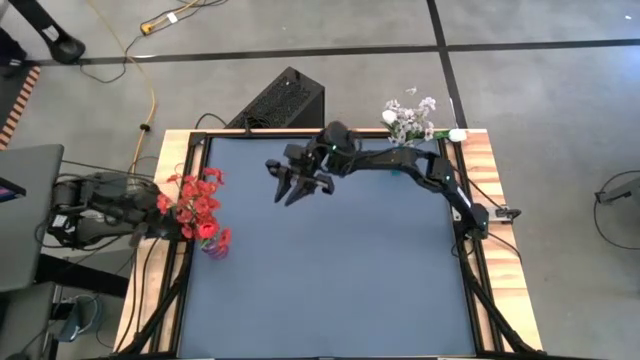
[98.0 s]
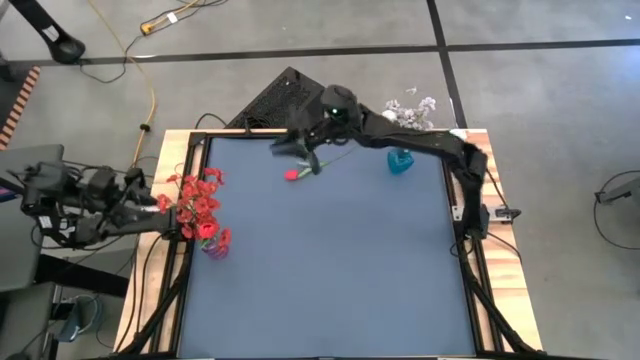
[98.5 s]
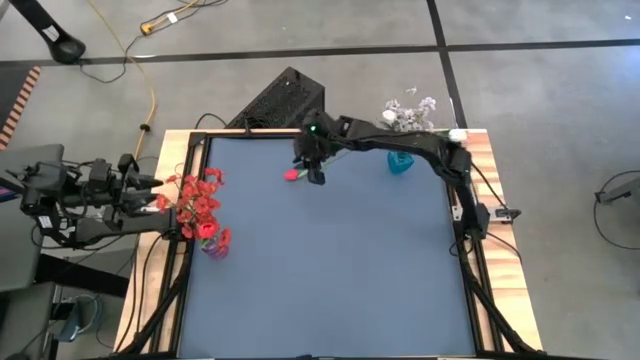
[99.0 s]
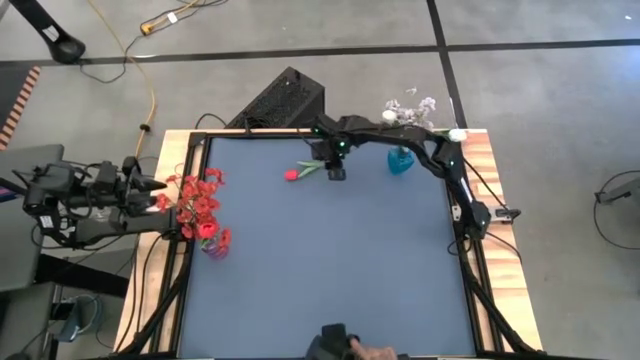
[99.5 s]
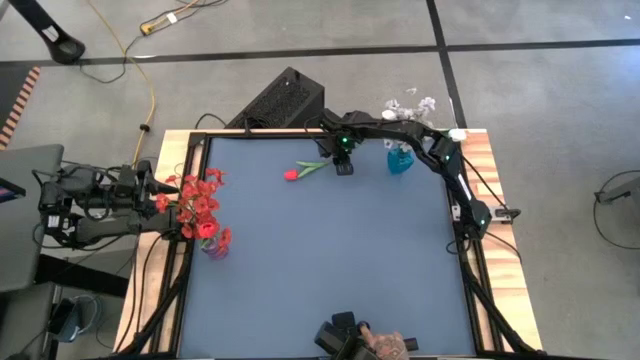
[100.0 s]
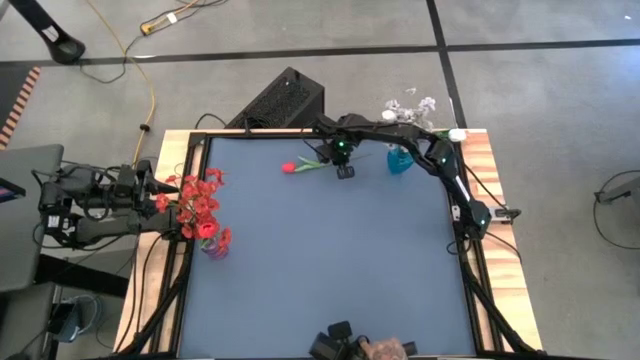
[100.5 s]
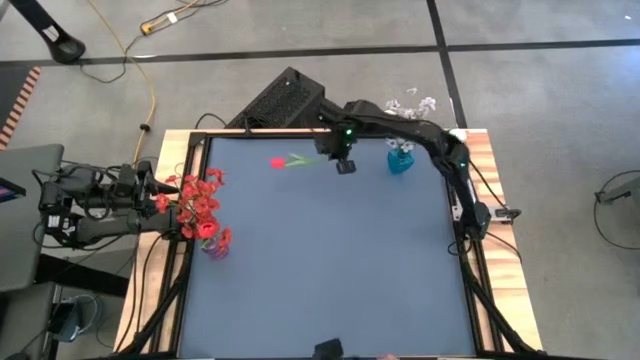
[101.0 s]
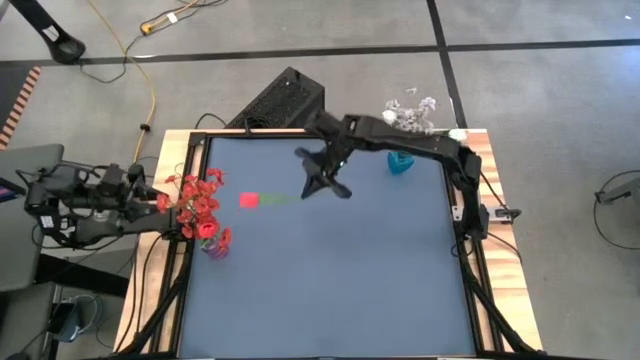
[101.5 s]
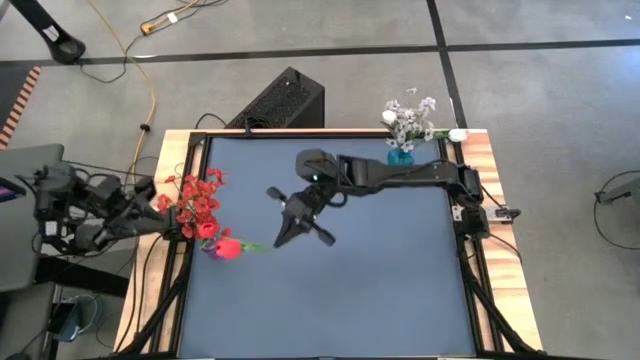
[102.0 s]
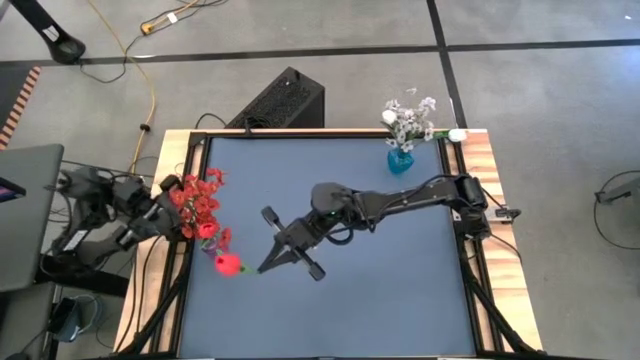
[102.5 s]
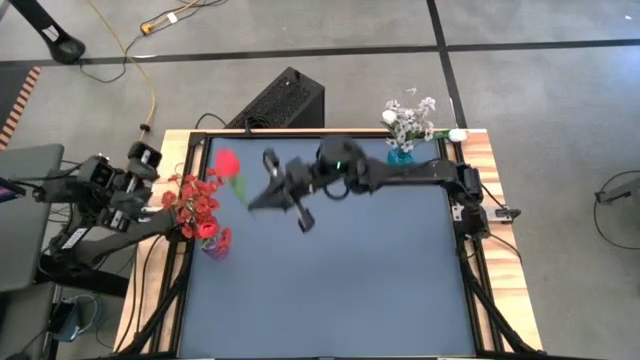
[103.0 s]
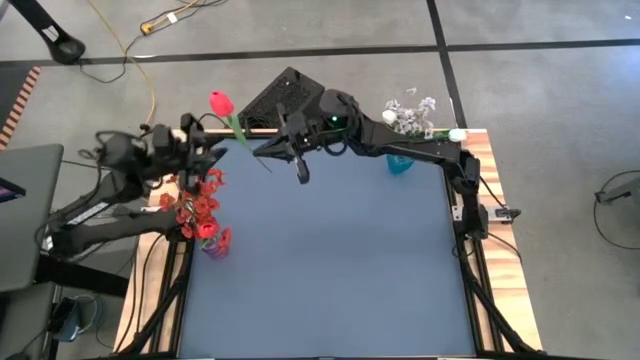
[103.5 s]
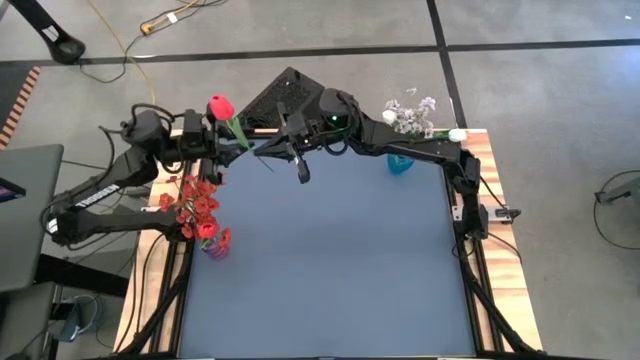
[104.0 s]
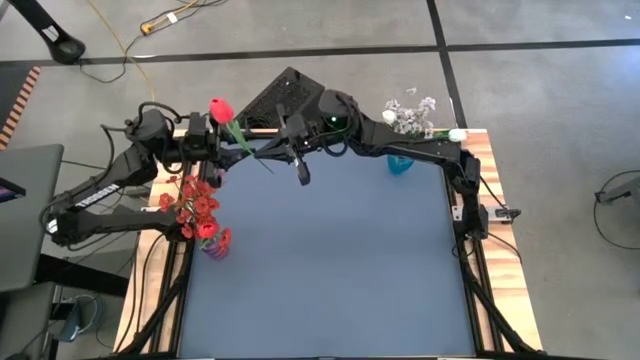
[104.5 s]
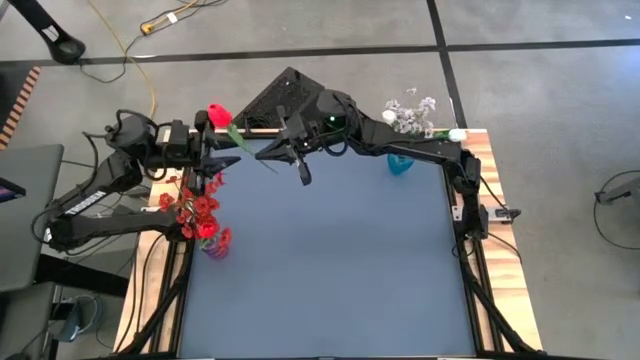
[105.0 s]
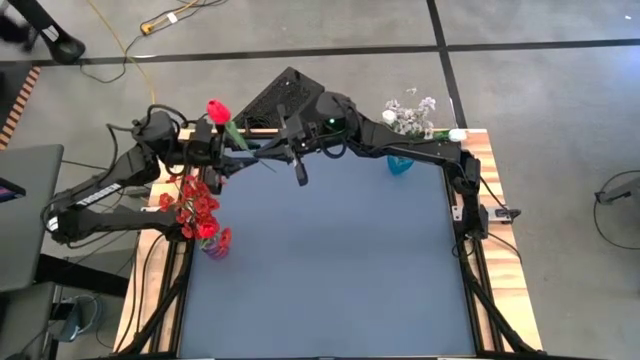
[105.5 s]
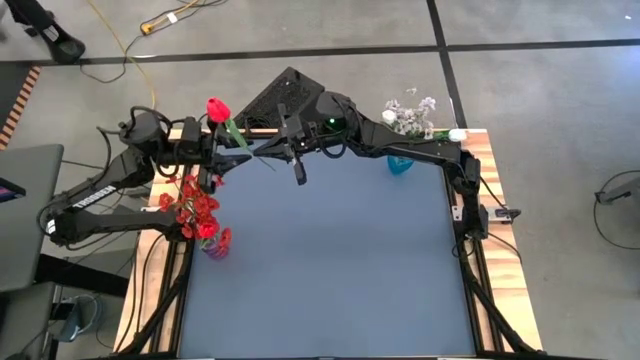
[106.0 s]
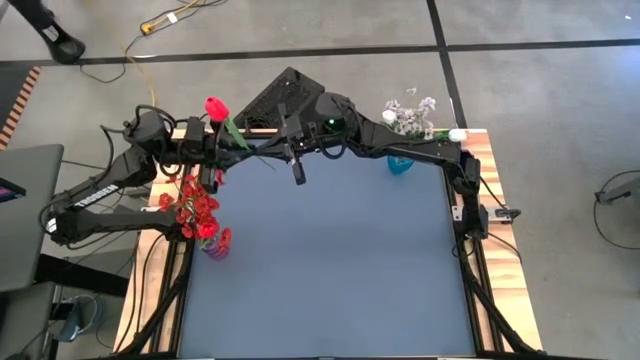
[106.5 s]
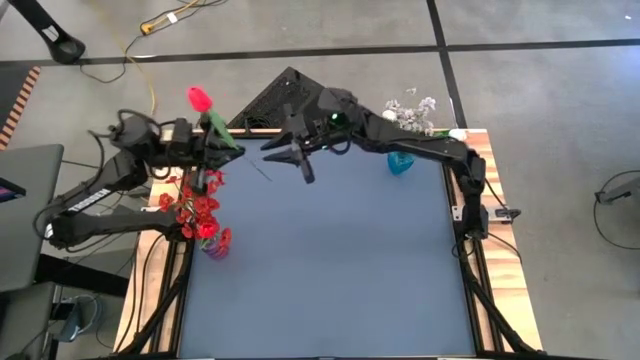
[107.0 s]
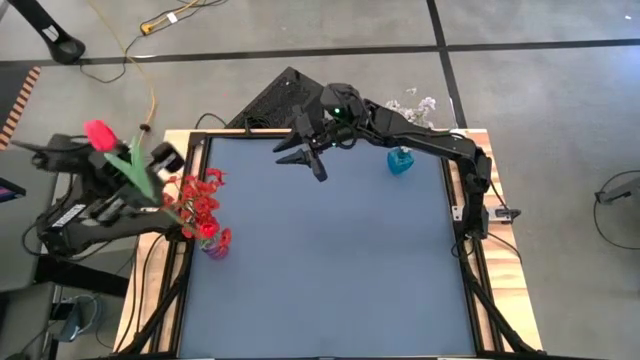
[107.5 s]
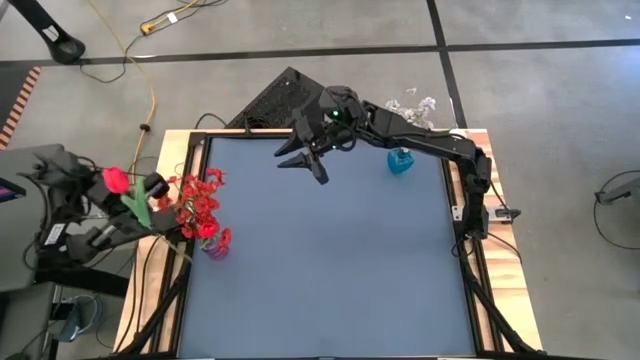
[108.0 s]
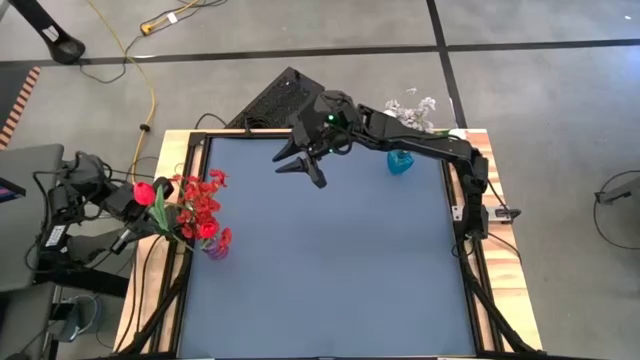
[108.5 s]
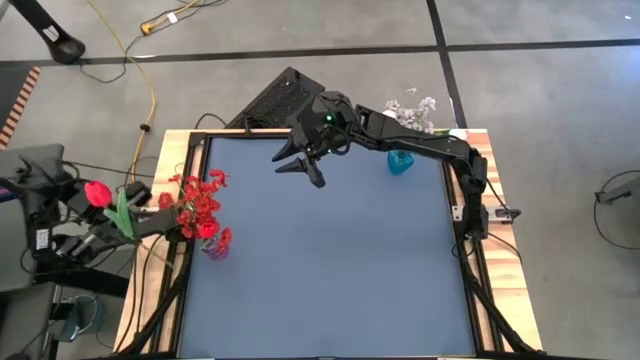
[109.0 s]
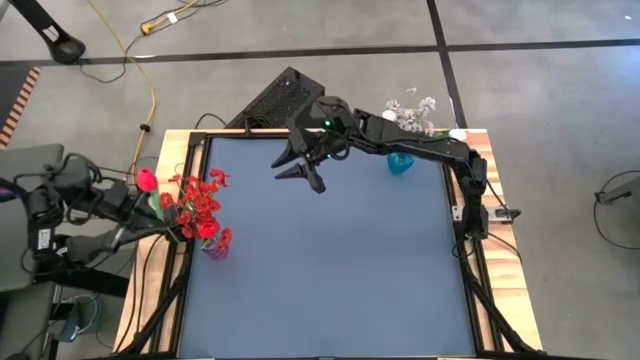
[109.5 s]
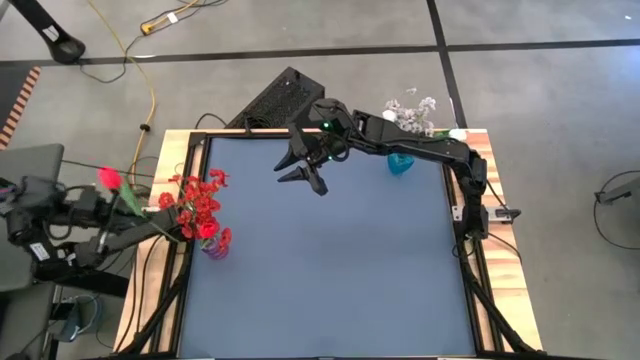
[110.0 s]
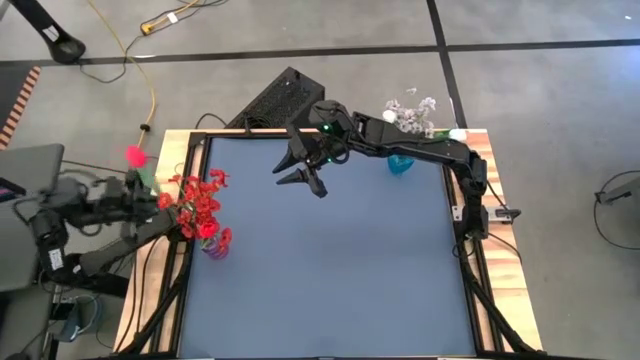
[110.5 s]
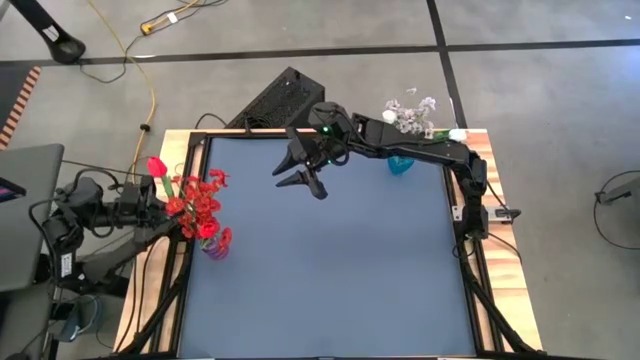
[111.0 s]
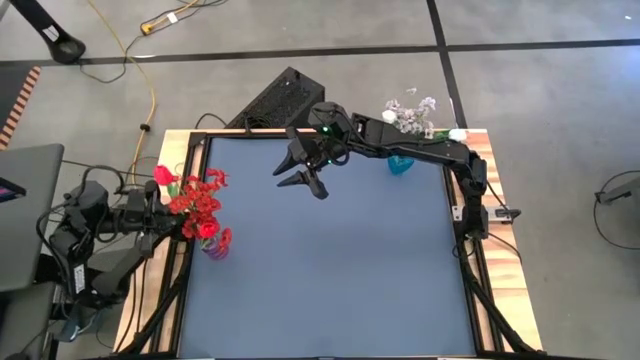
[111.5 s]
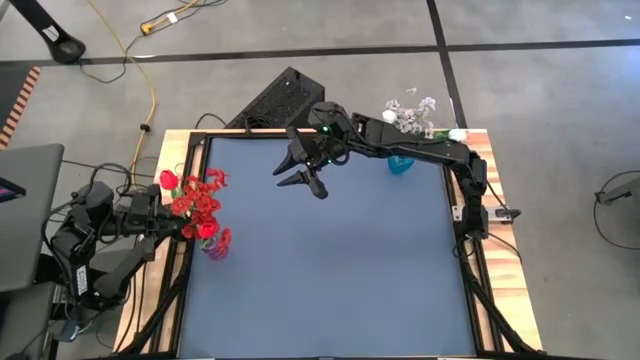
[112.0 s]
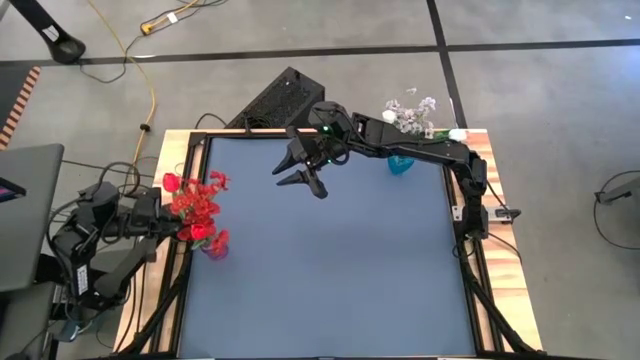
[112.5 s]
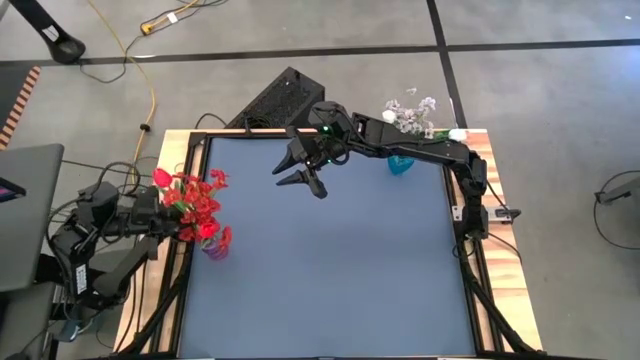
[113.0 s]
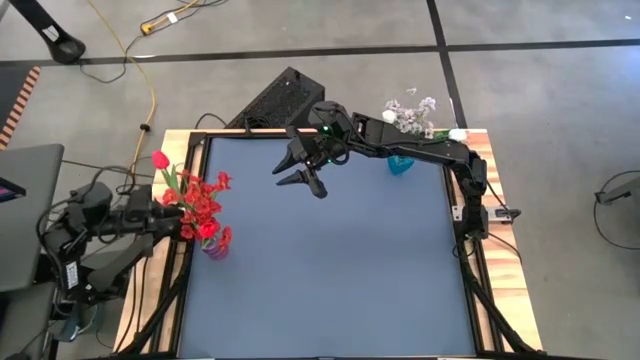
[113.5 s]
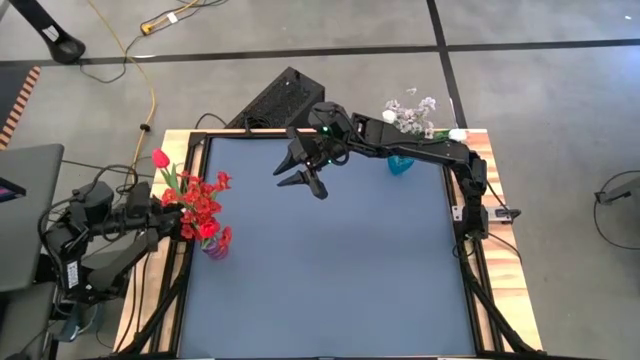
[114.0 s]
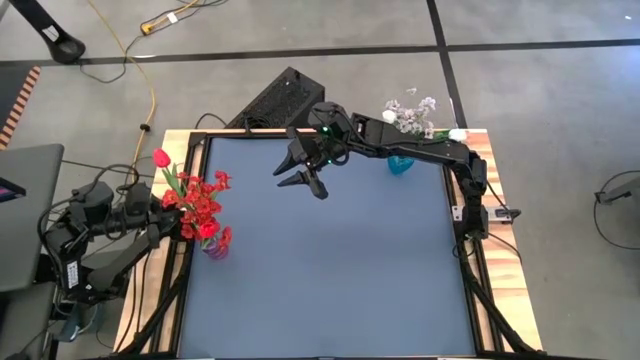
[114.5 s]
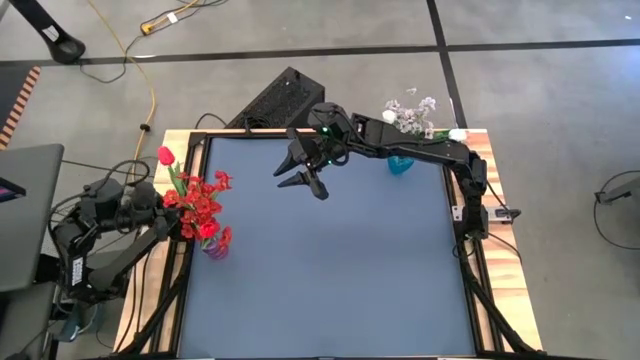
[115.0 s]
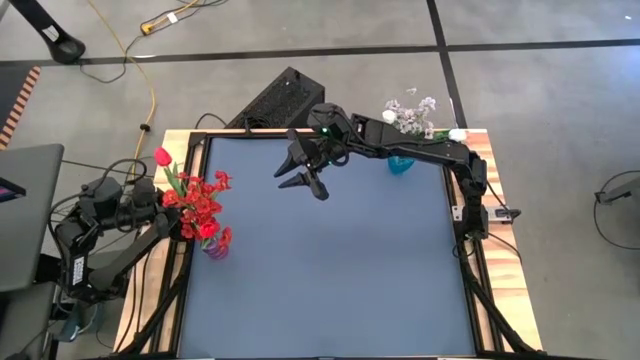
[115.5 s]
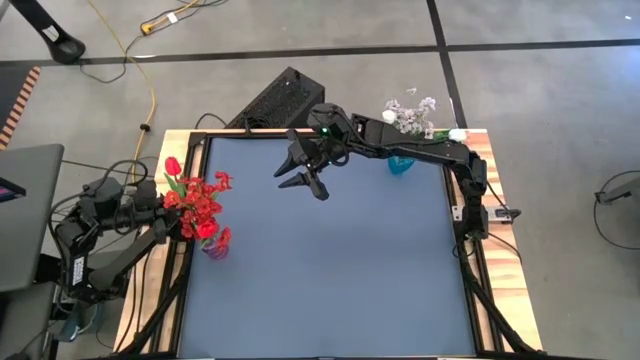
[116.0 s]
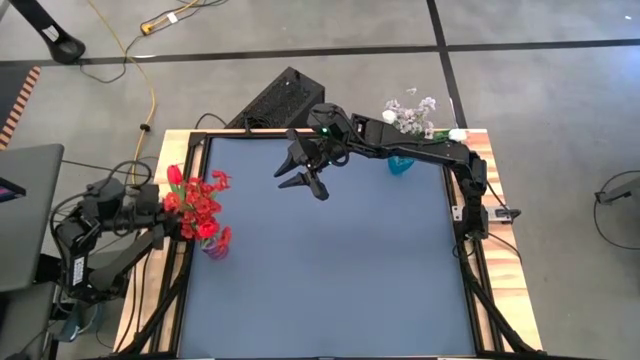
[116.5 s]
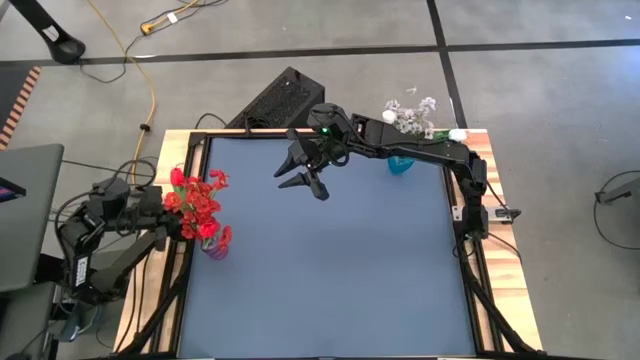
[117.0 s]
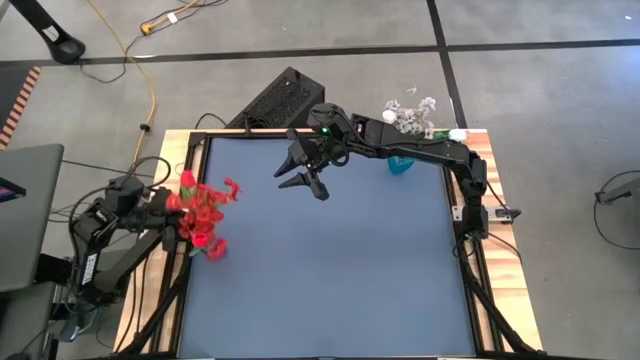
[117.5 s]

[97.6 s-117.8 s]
Task: Sort flowers into vase by color
Put the red flower into the purple vase

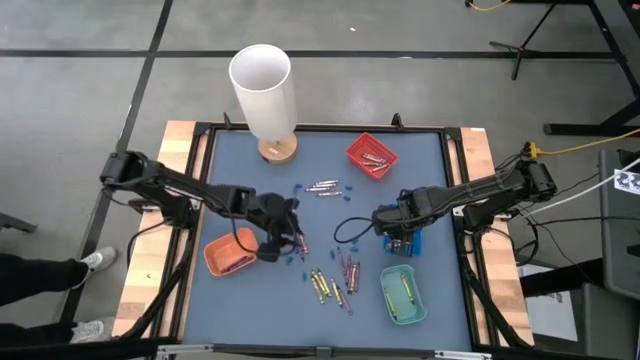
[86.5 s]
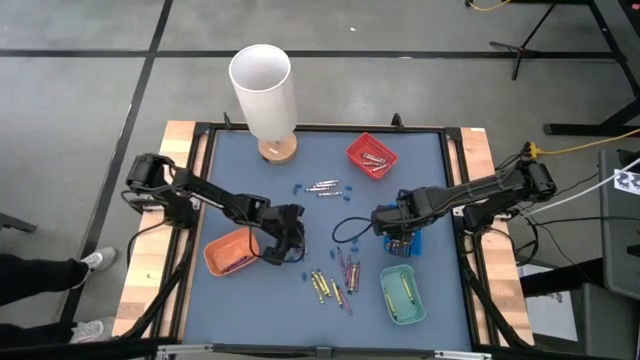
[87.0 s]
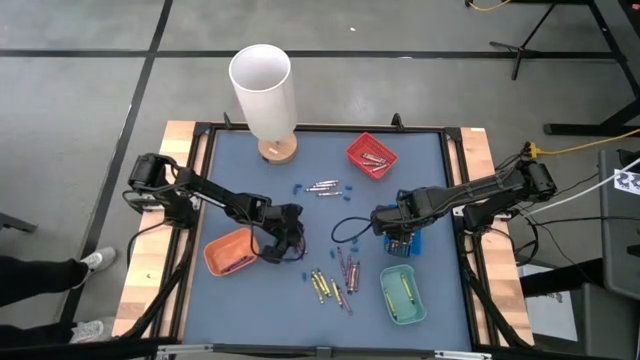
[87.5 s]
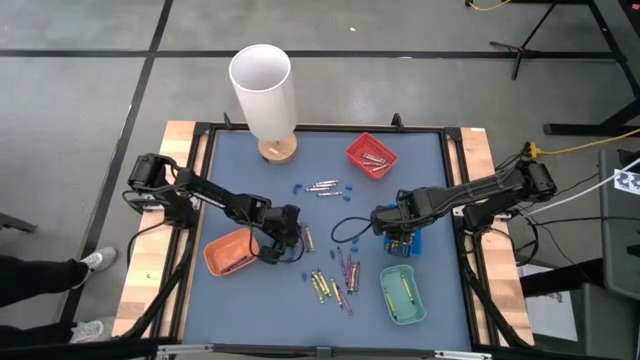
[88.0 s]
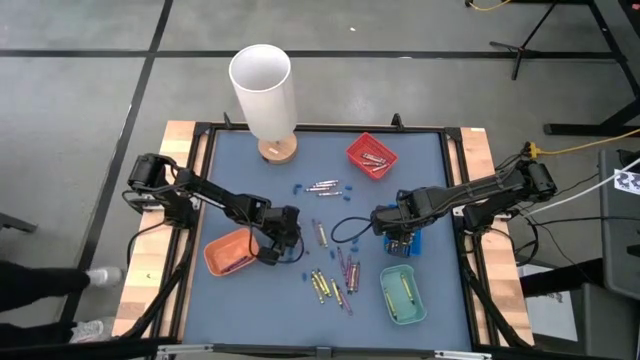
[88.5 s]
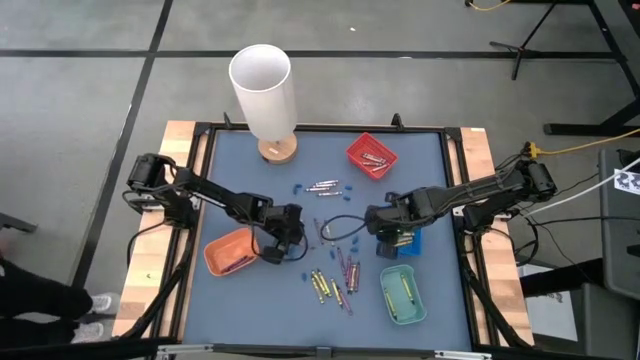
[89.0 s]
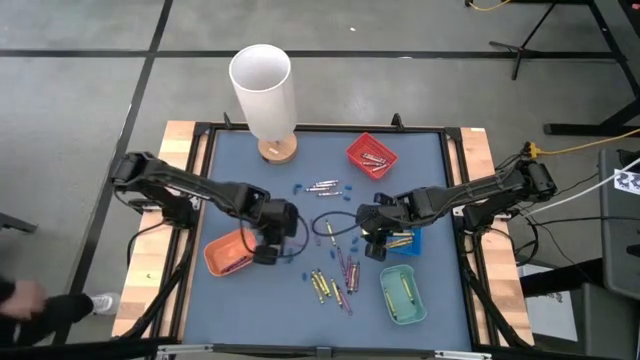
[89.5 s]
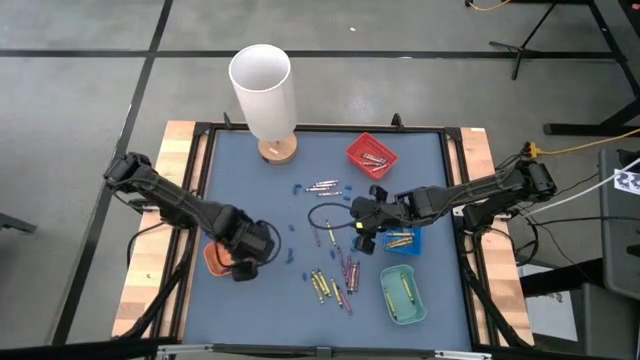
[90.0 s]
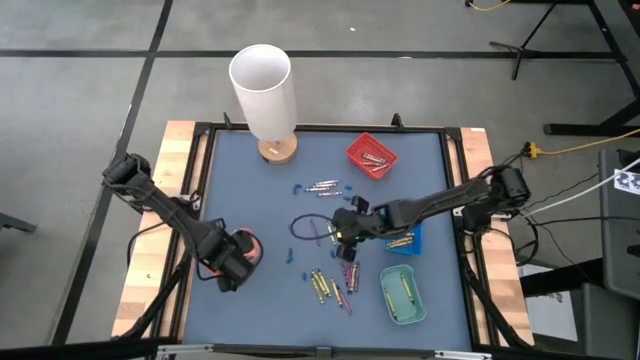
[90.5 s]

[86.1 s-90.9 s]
Task: Sort crayons
Put the violet crayon into the orange bin
